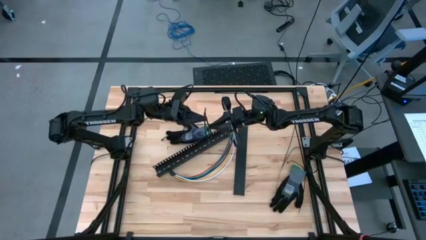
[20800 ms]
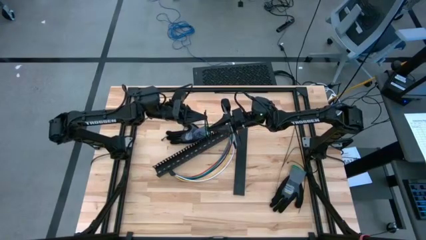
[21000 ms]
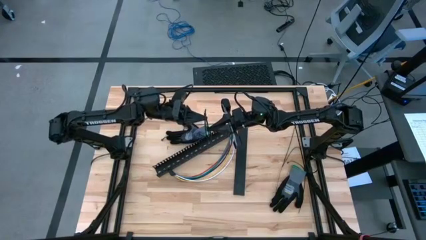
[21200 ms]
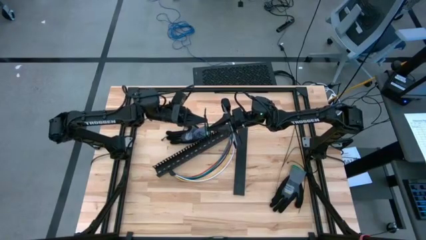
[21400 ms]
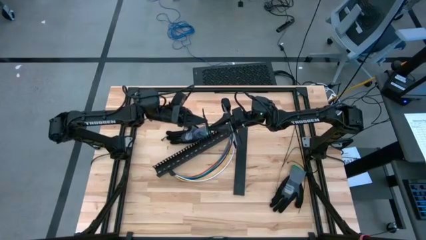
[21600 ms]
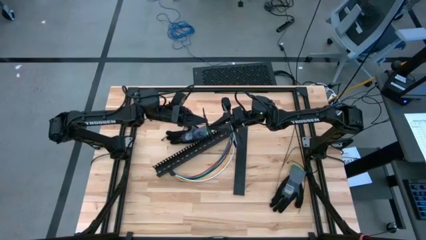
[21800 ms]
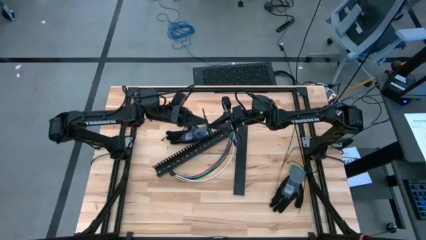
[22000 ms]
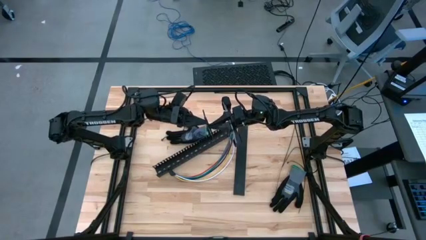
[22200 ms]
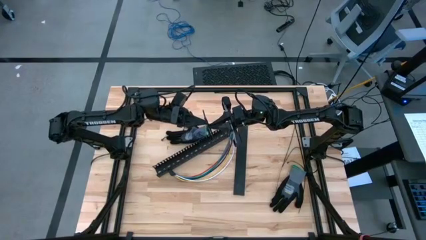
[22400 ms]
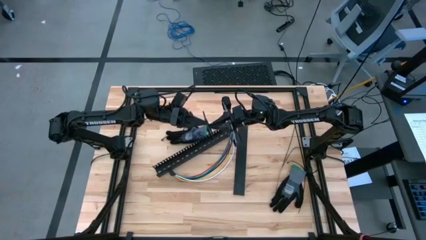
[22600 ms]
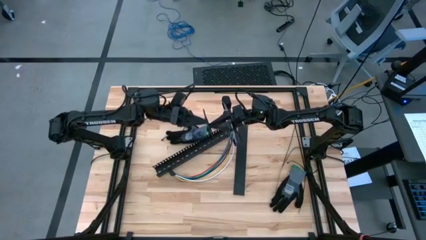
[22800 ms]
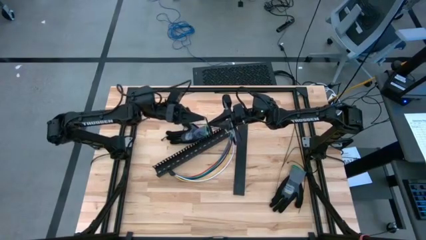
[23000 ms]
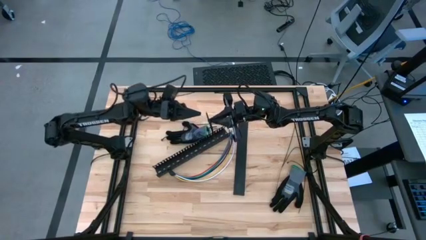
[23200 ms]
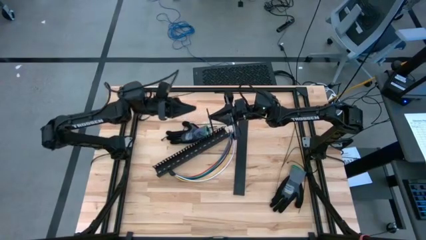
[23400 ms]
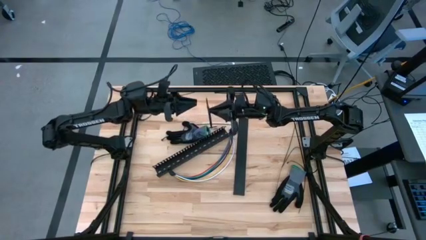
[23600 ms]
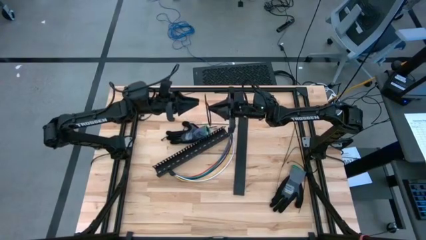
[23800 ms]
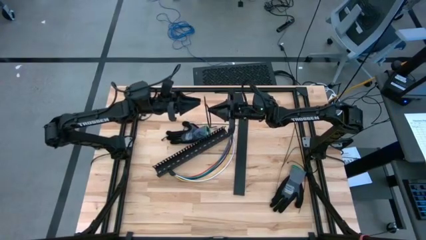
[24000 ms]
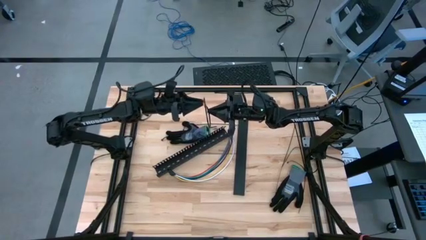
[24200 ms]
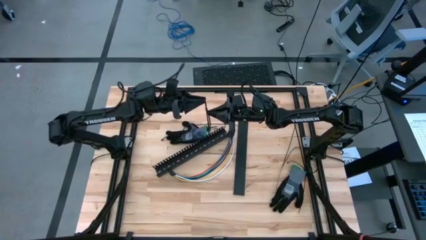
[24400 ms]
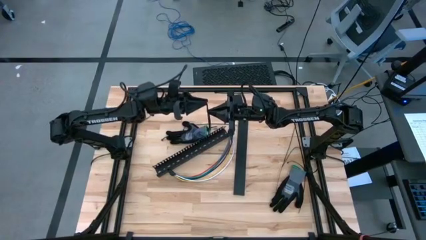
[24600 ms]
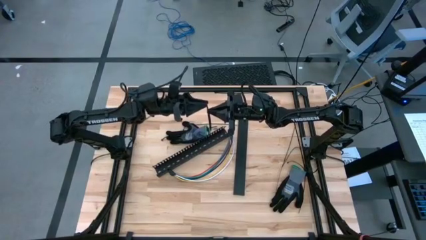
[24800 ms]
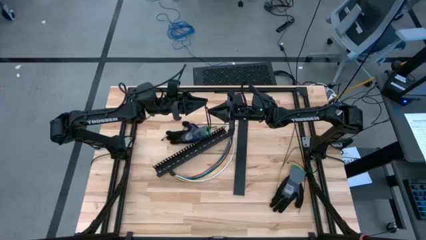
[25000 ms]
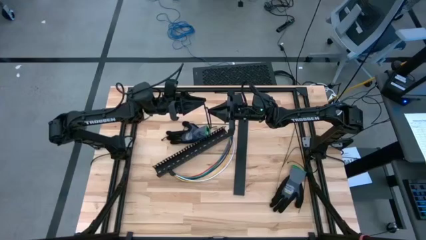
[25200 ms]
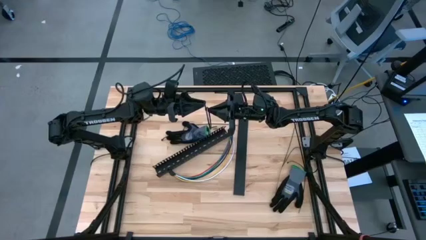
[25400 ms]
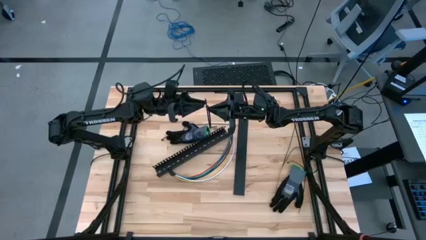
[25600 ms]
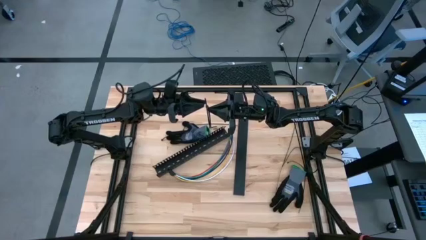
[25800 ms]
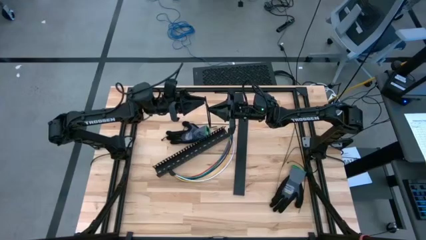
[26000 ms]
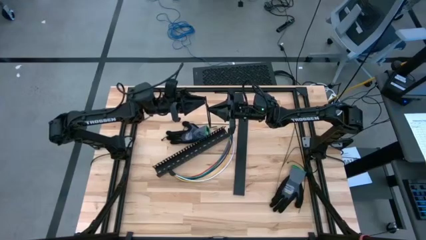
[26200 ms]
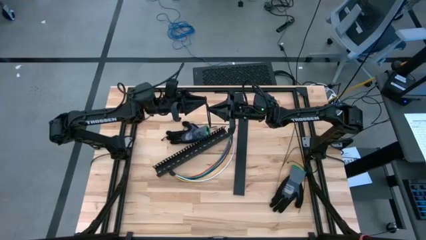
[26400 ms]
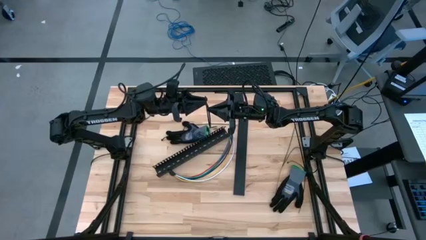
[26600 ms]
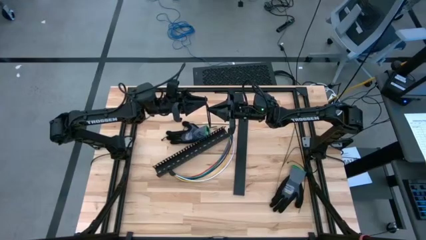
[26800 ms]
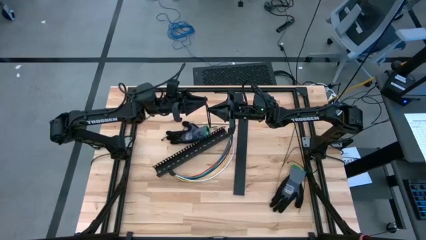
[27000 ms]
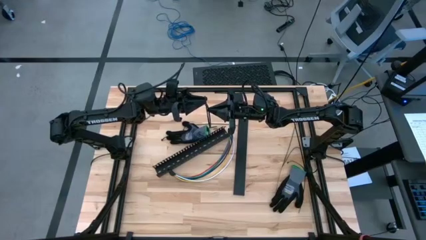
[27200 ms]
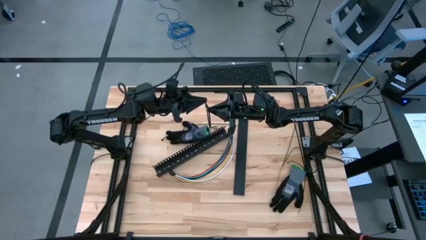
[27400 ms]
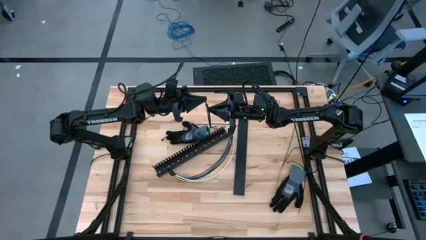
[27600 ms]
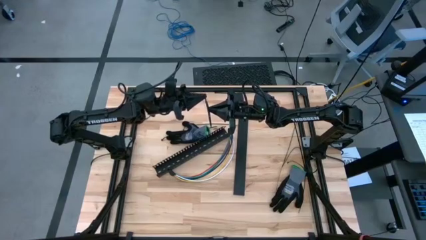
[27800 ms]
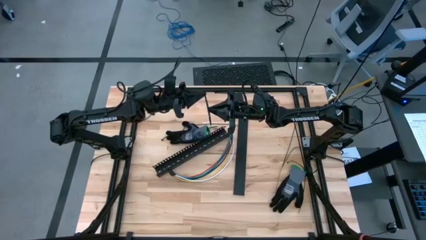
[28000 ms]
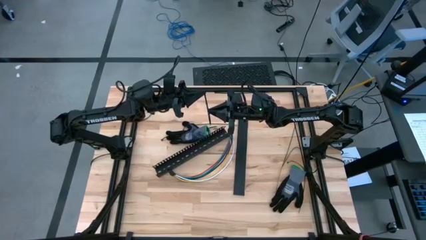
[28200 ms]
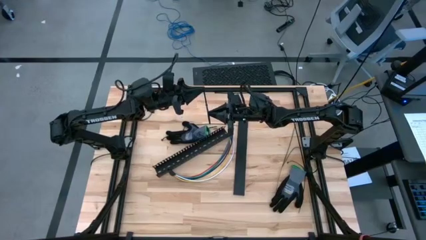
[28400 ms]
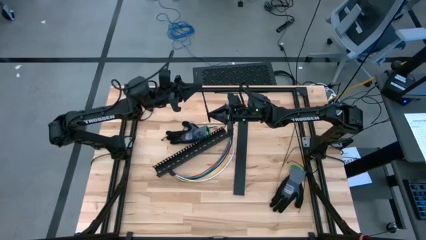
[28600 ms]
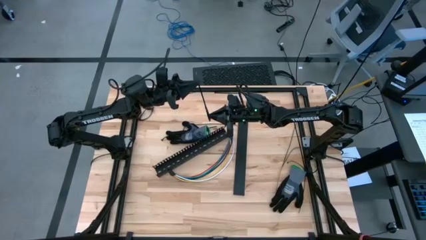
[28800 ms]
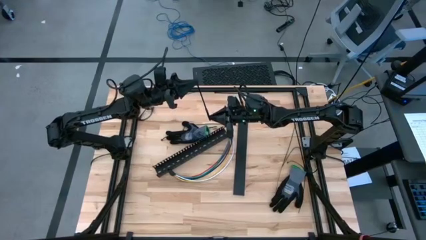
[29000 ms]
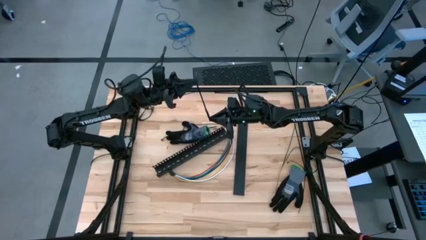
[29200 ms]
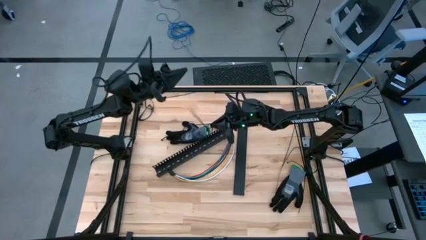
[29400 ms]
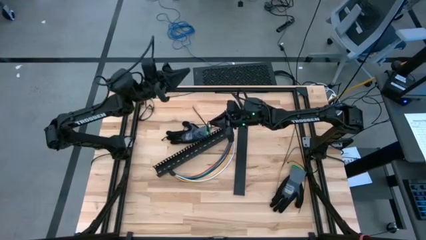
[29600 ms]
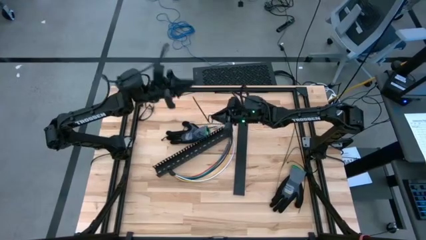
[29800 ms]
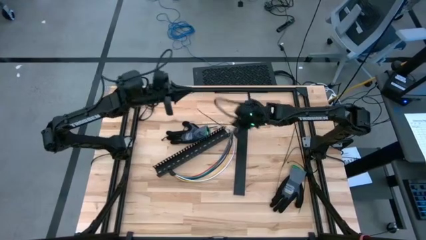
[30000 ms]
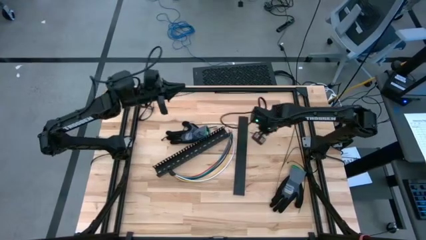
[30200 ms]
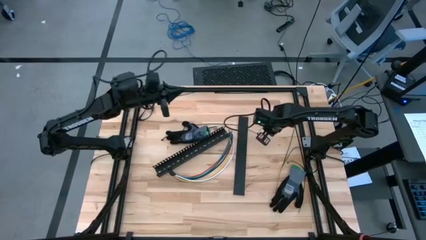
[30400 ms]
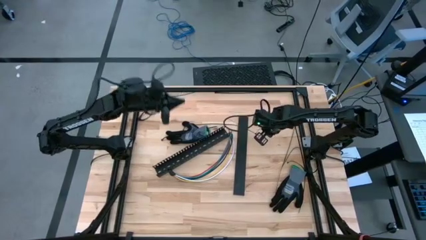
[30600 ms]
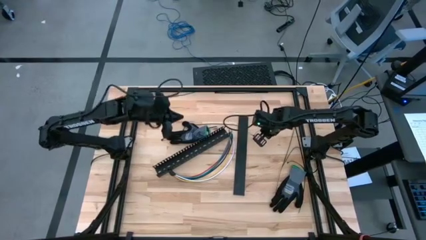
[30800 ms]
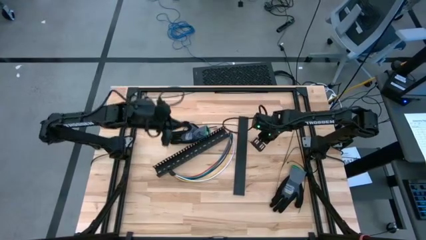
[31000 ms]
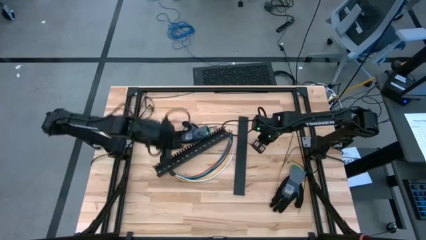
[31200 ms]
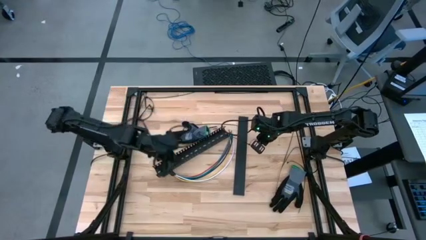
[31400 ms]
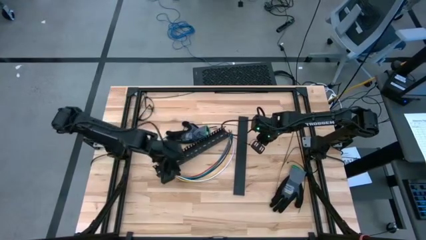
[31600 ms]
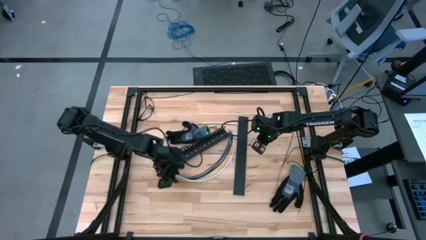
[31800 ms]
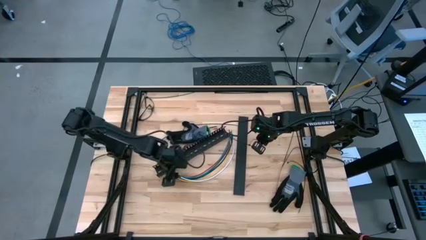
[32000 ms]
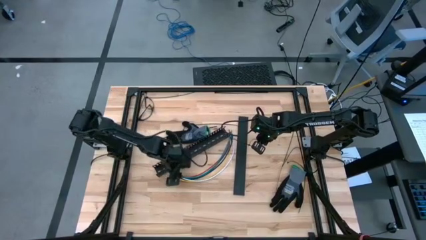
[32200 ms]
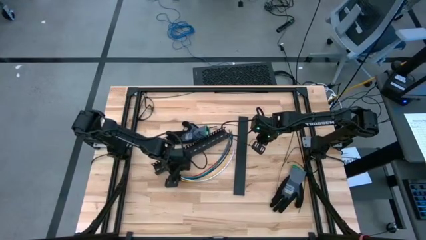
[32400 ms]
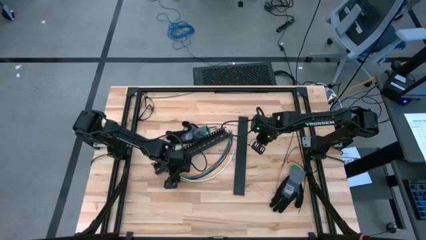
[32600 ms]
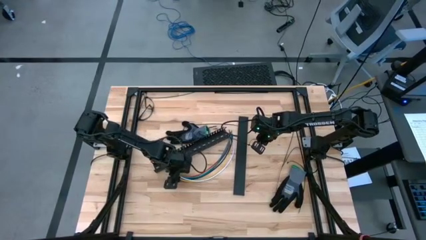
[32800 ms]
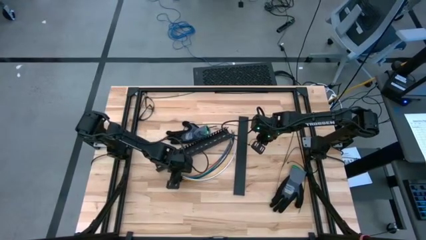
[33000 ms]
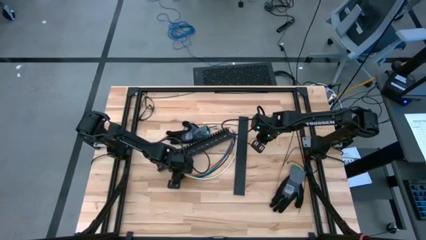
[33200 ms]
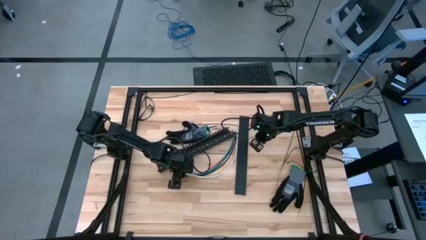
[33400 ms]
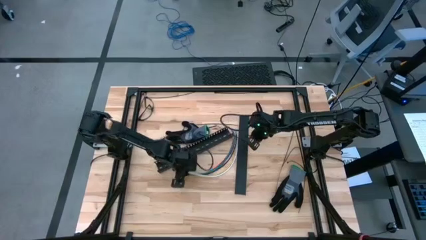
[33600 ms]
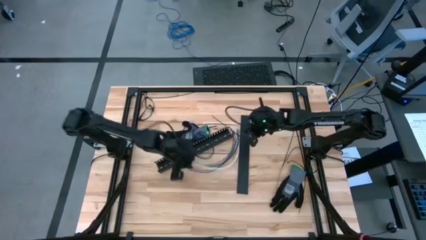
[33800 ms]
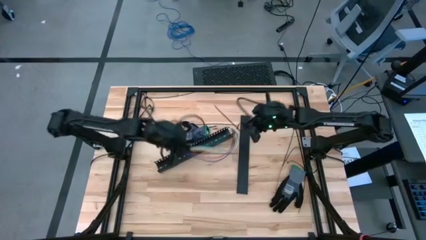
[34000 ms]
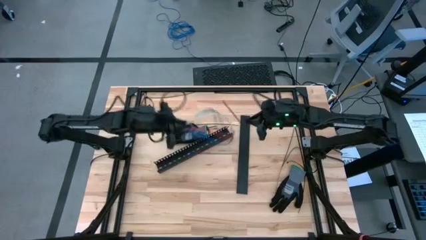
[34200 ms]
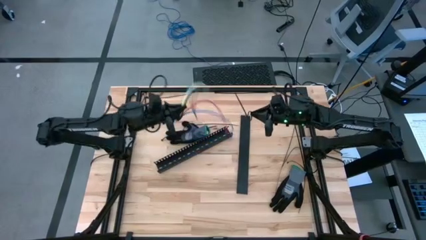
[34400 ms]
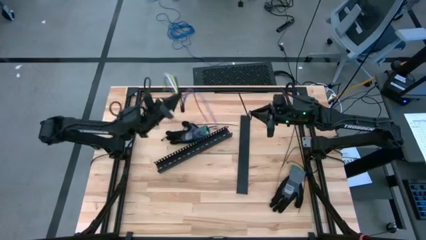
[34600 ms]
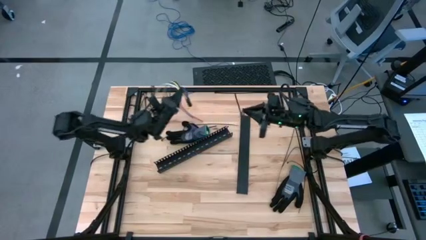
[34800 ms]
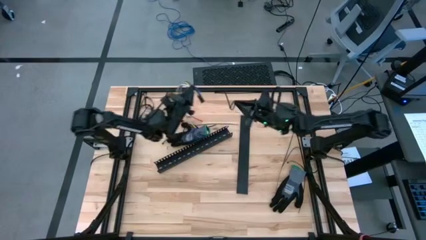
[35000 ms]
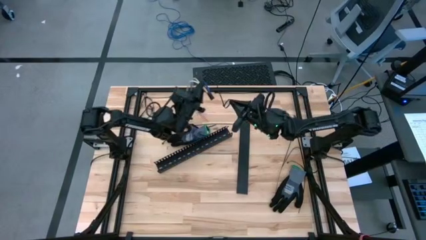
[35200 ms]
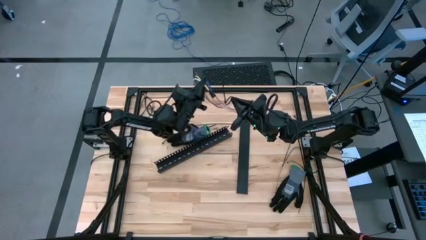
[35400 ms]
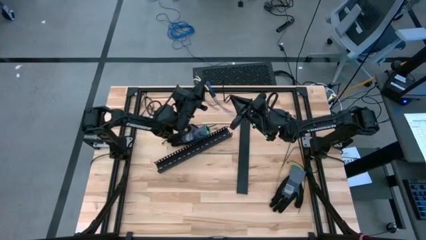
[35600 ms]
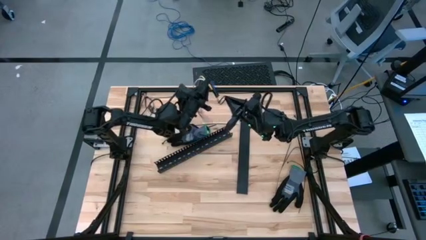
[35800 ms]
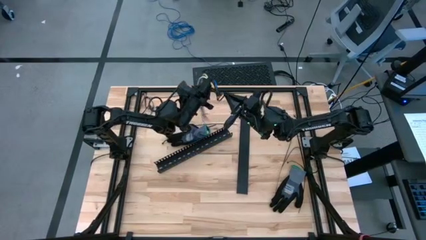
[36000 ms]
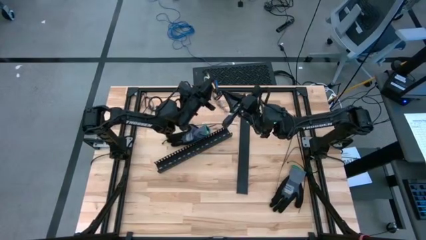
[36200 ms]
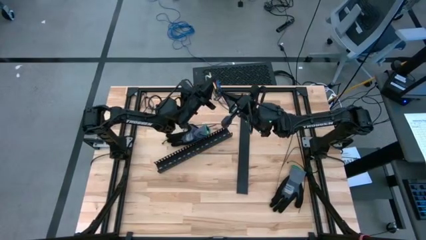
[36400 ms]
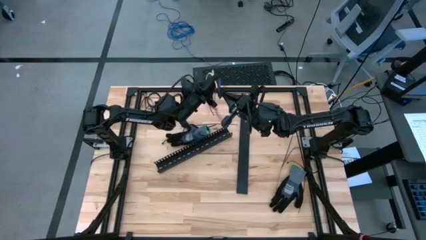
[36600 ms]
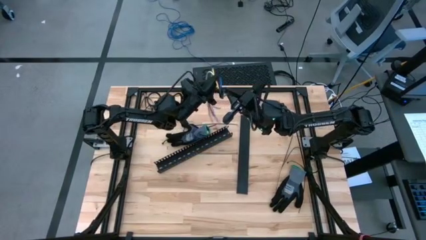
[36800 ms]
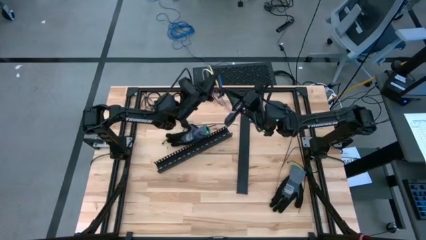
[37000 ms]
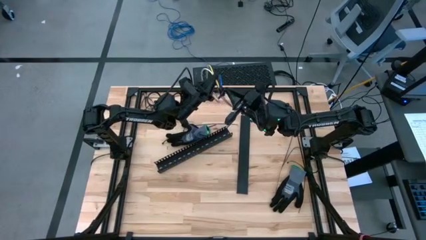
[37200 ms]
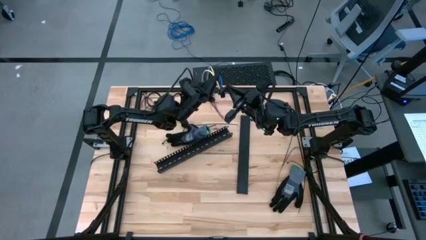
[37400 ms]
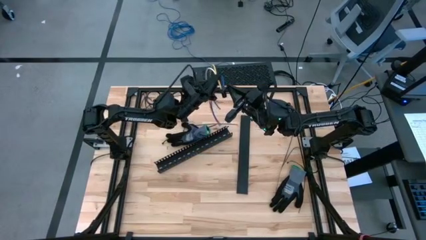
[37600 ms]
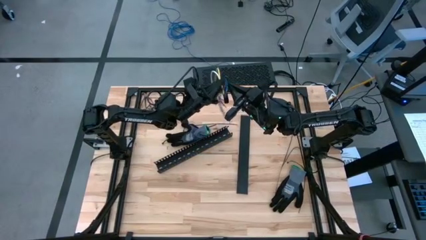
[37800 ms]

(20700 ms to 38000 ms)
Task: Ziptie cables
Wrap the cable wires with black zip tie
